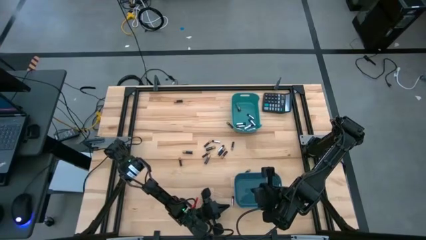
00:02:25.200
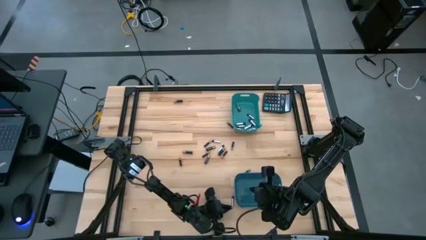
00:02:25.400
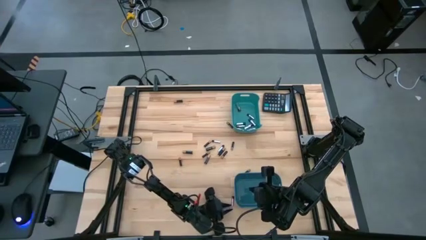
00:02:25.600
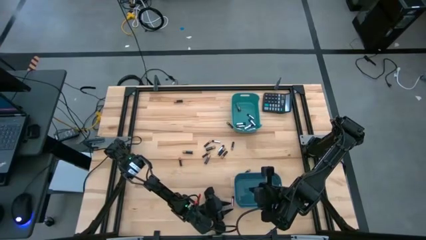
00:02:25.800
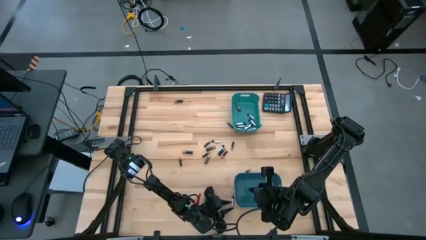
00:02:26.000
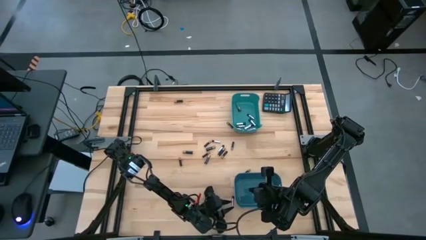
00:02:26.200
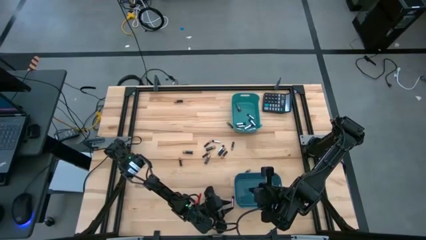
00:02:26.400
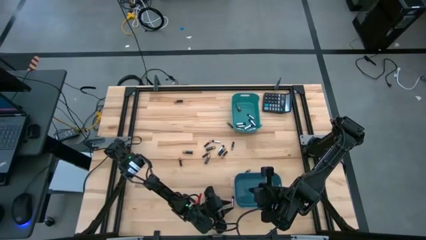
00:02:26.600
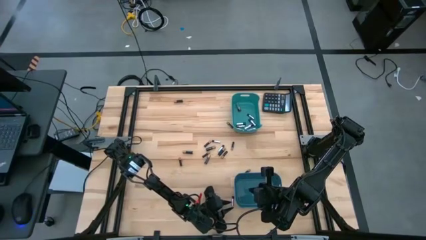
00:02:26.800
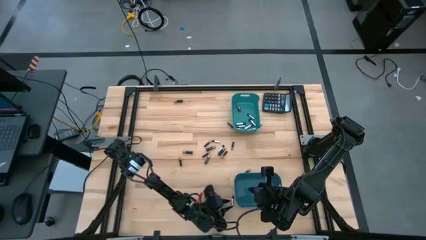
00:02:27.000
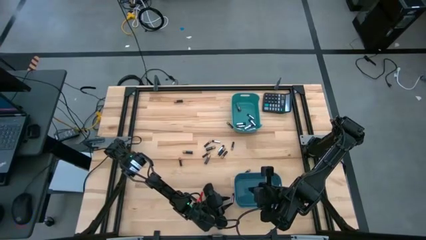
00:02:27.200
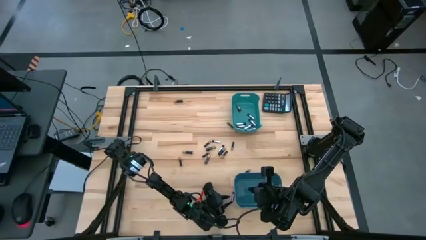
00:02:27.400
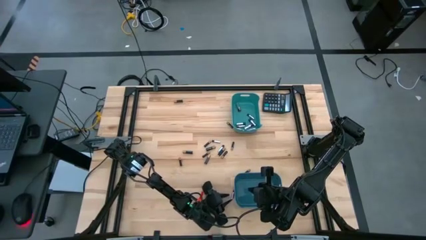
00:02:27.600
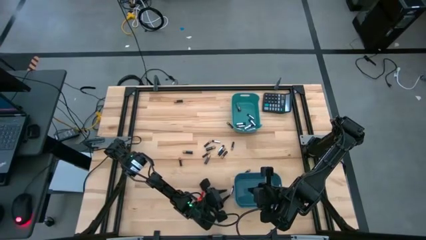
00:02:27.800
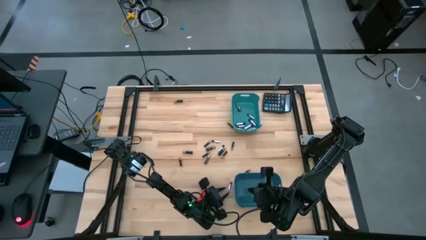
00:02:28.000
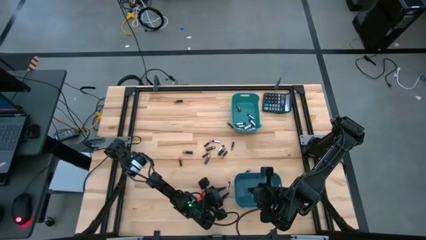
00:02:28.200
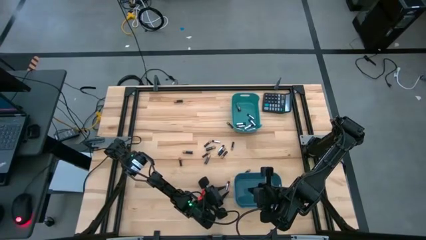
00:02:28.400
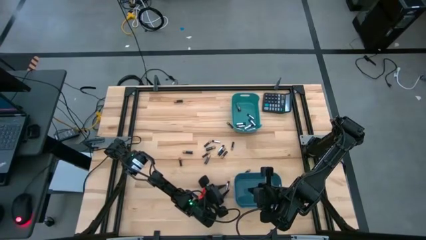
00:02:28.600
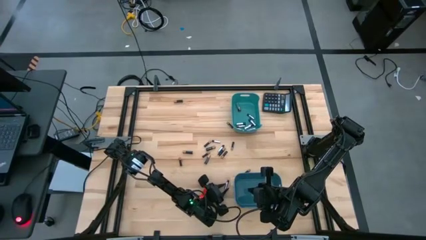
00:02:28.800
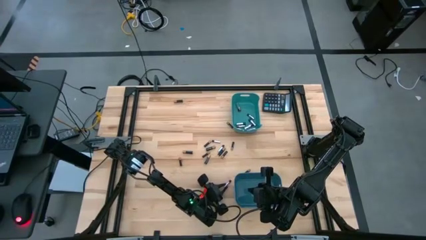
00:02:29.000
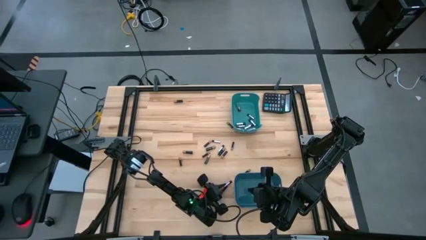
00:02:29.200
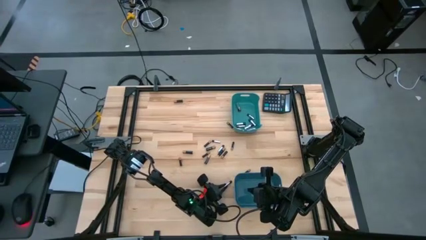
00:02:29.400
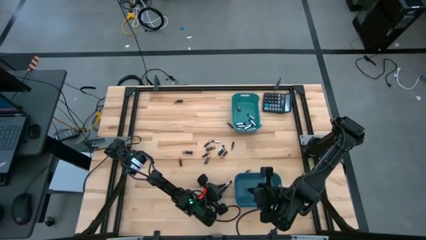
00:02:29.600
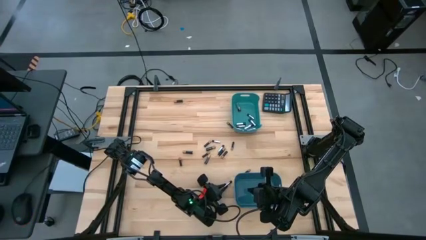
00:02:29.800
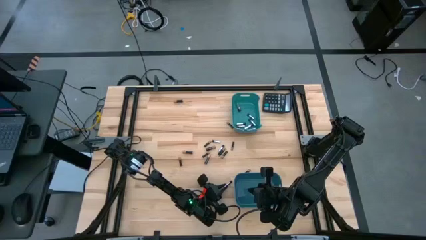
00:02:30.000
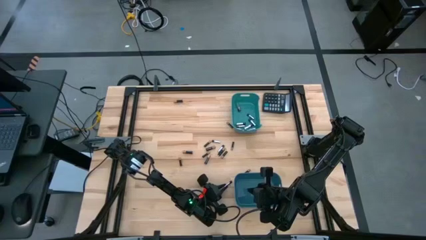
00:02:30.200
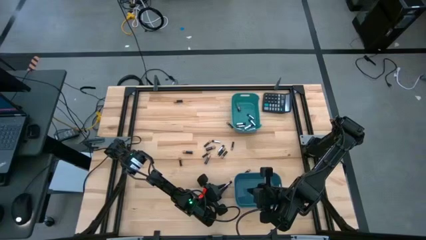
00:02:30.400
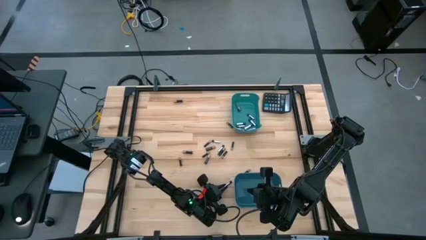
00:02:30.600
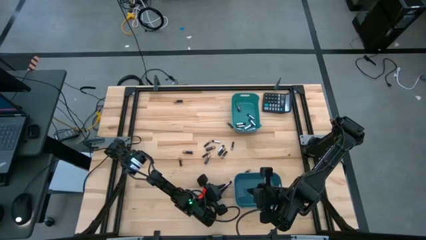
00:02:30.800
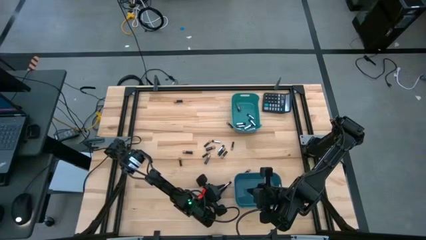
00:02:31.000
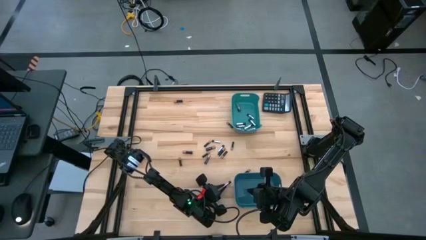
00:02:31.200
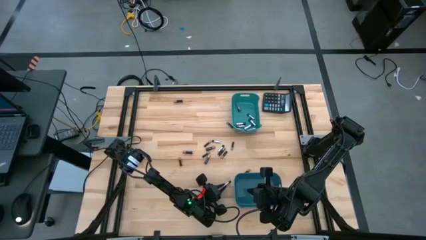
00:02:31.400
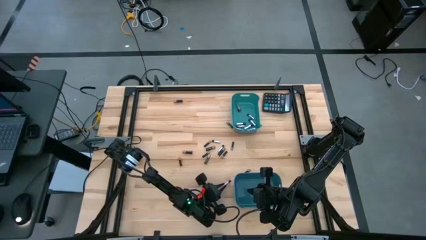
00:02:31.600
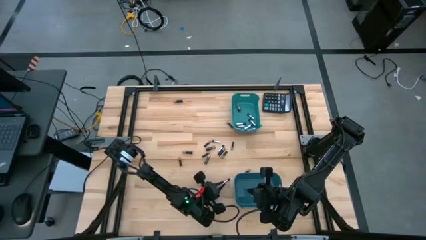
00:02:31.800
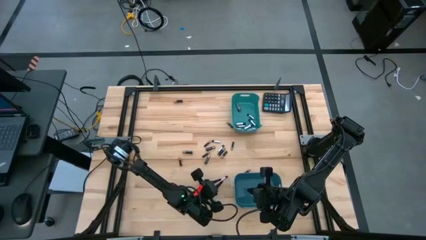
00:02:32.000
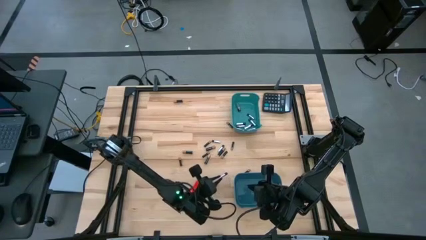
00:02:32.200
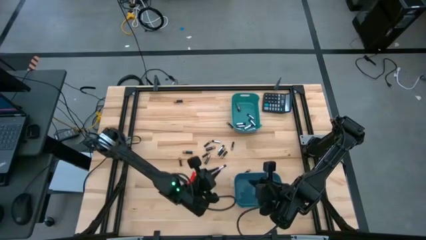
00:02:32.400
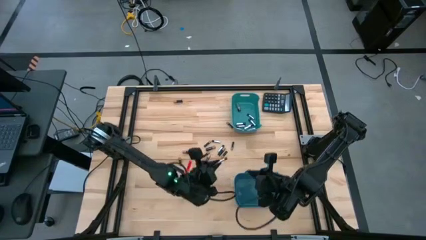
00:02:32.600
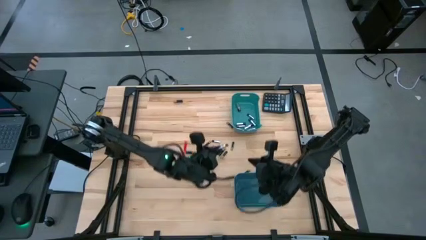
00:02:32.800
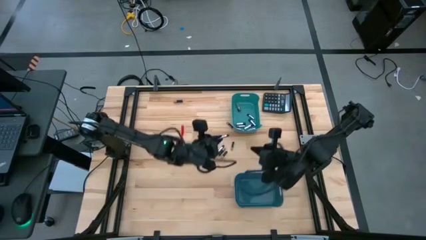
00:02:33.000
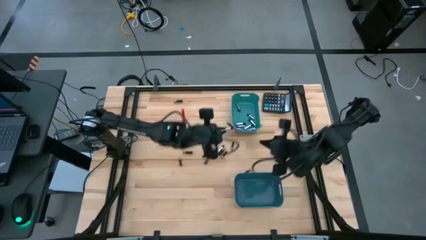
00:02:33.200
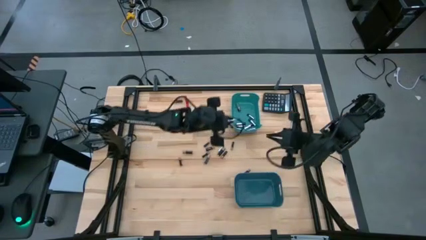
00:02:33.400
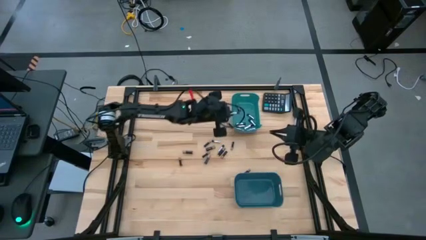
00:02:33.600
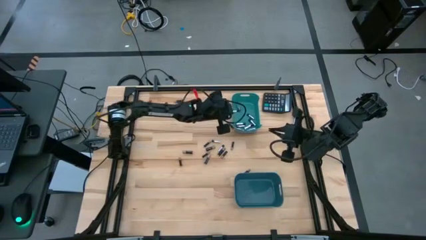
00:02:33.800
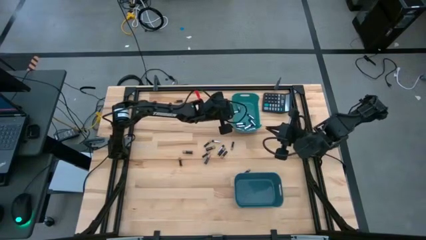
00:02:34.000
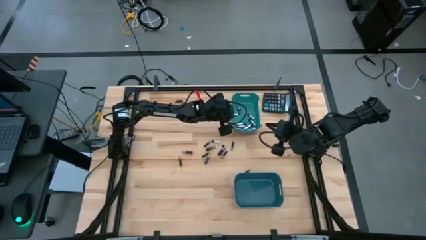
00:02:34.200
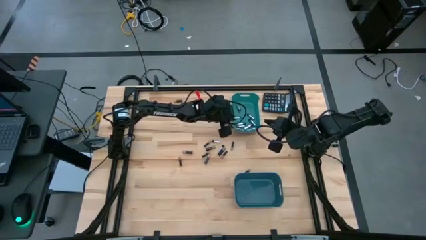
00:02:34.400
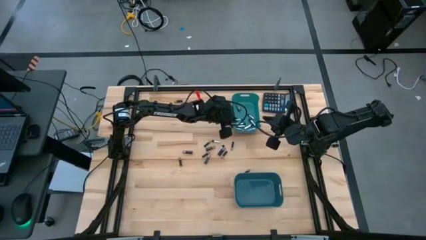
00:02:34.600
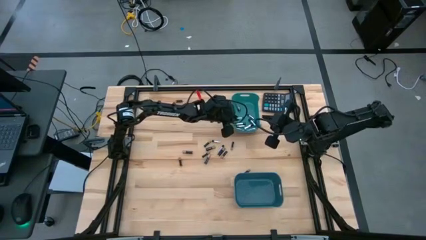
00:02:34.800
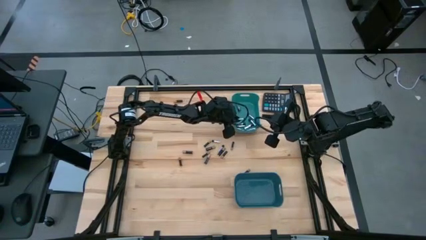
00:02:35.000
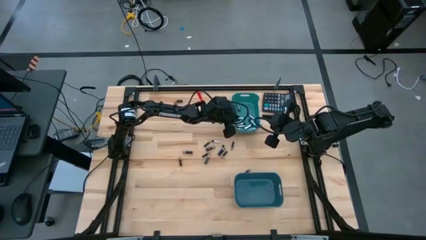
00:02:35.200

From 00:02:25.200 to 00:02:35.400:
Task: Sort batteries
Put the silver battery into the green bin

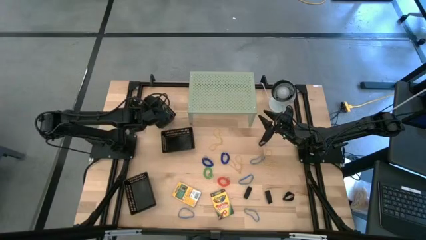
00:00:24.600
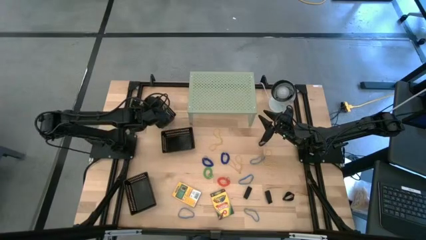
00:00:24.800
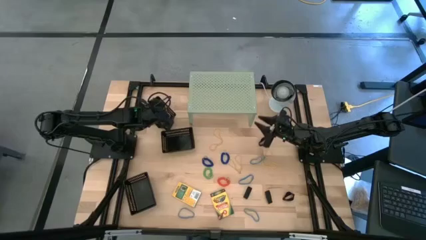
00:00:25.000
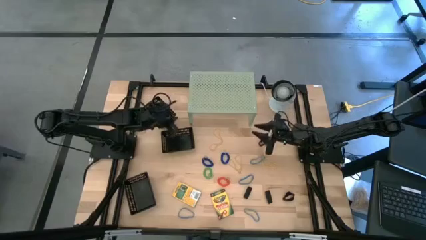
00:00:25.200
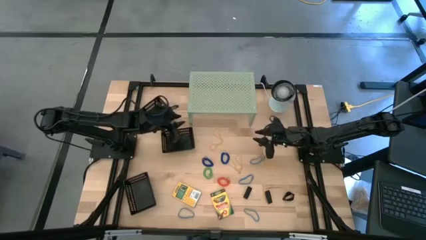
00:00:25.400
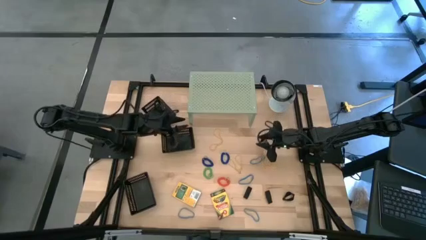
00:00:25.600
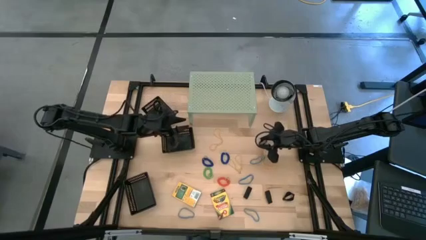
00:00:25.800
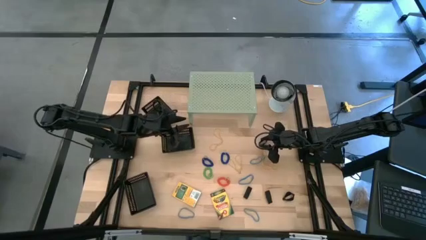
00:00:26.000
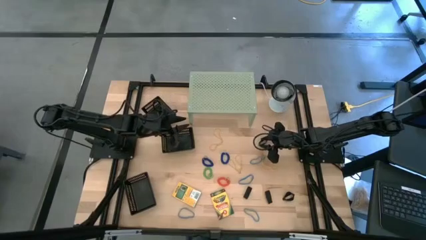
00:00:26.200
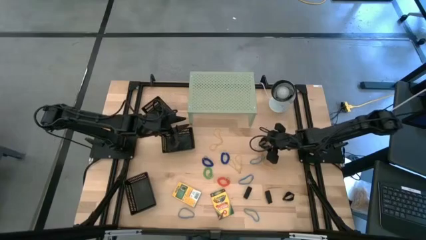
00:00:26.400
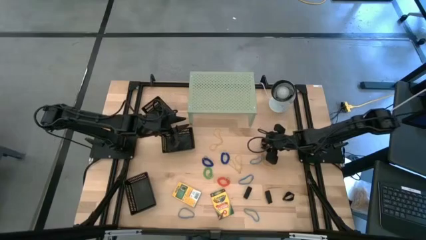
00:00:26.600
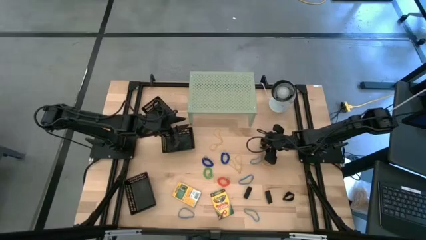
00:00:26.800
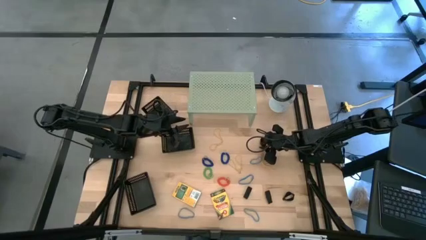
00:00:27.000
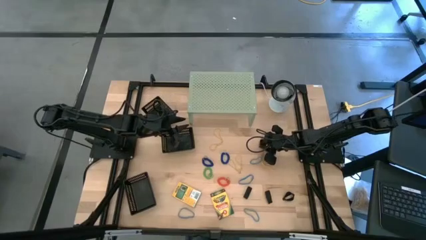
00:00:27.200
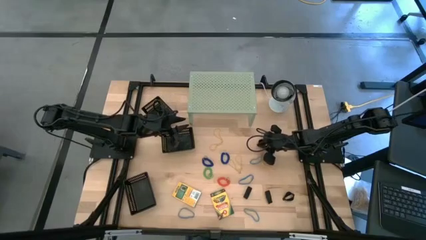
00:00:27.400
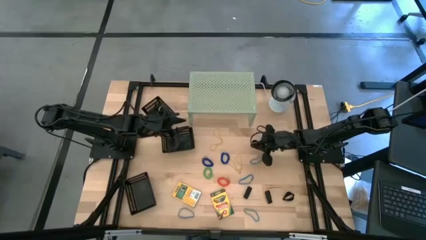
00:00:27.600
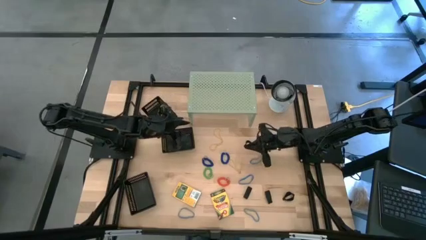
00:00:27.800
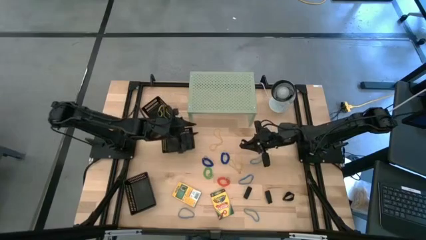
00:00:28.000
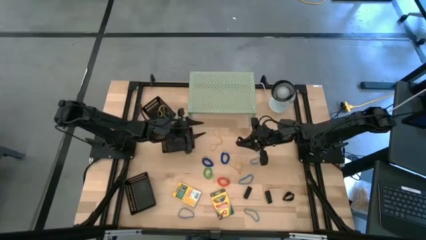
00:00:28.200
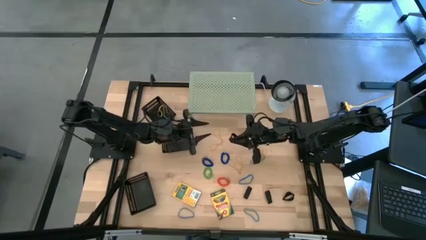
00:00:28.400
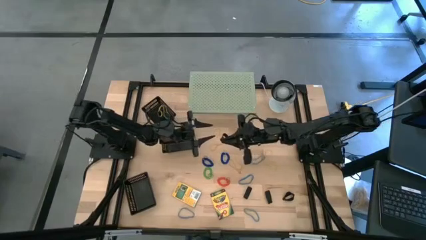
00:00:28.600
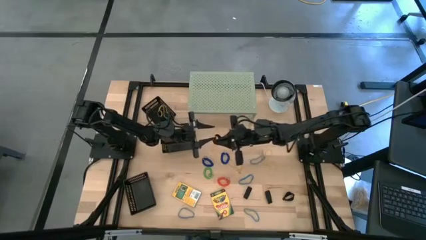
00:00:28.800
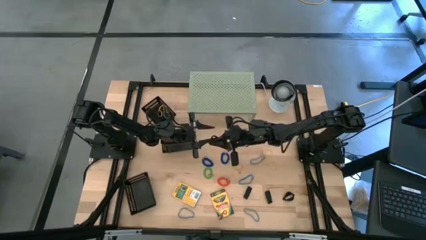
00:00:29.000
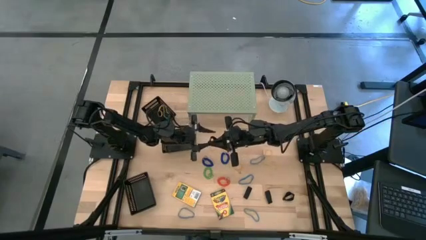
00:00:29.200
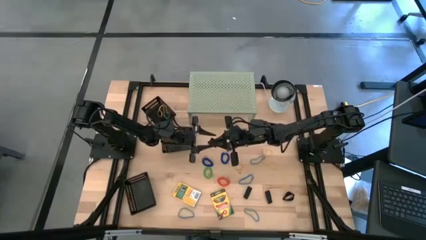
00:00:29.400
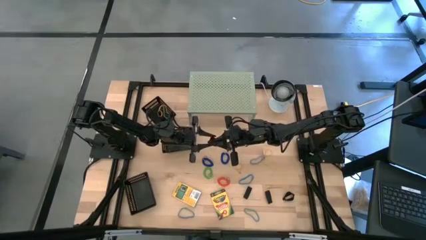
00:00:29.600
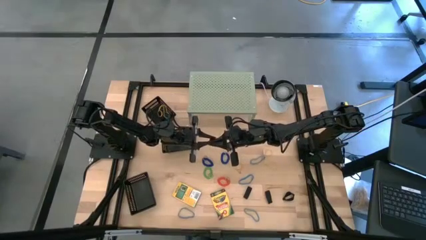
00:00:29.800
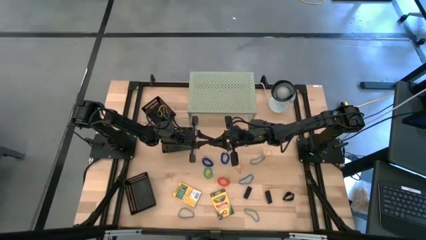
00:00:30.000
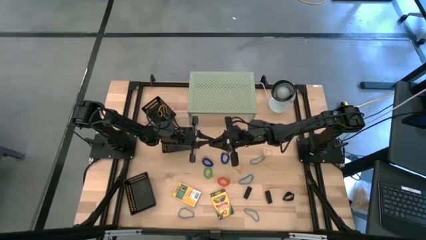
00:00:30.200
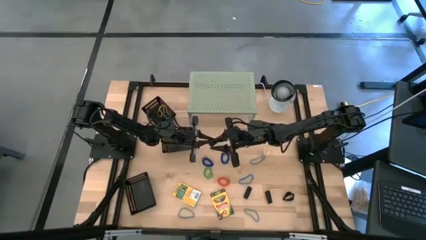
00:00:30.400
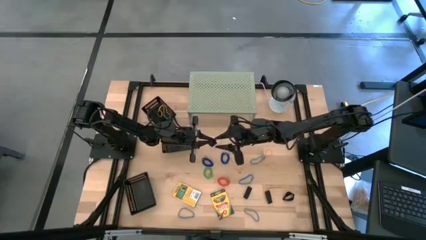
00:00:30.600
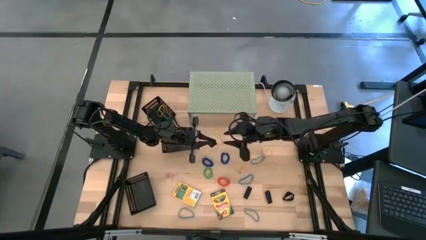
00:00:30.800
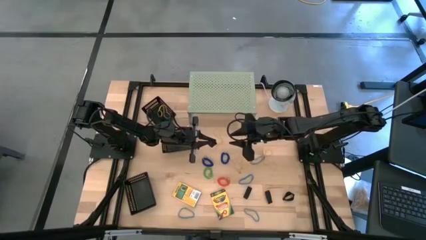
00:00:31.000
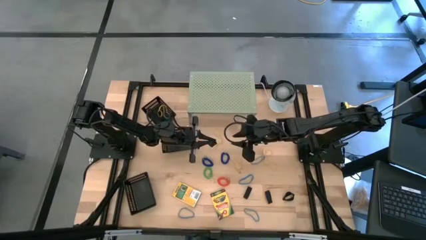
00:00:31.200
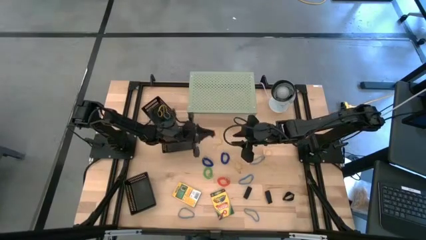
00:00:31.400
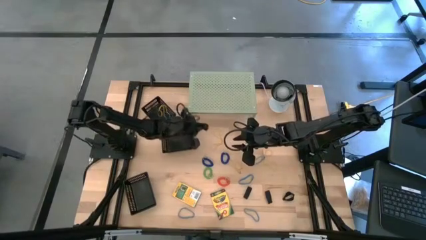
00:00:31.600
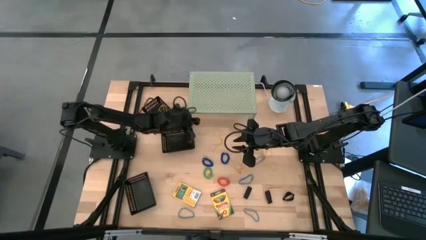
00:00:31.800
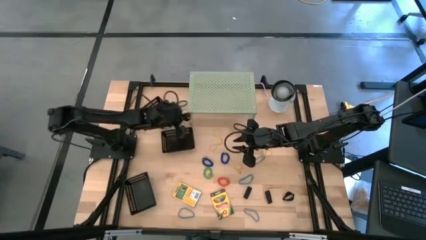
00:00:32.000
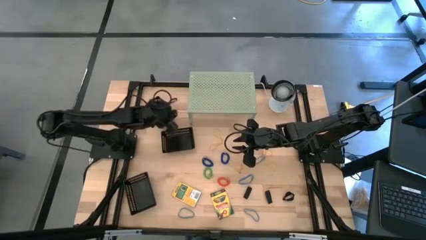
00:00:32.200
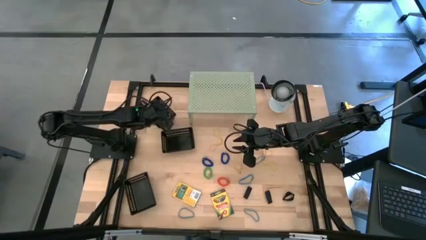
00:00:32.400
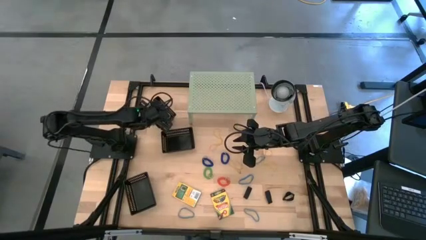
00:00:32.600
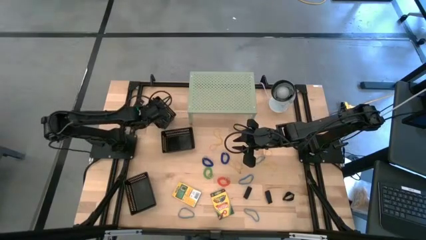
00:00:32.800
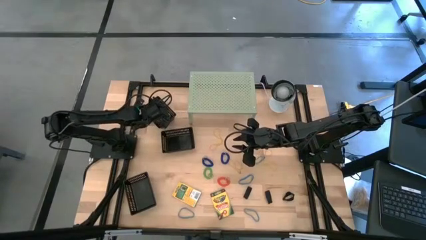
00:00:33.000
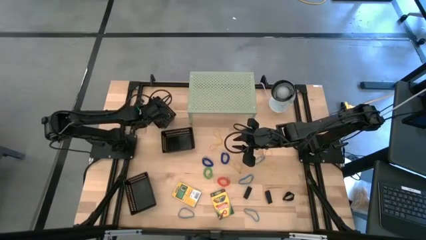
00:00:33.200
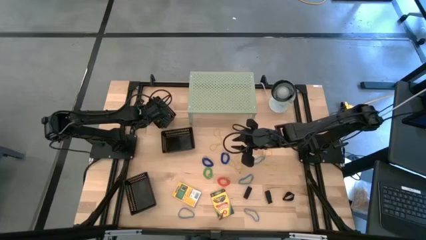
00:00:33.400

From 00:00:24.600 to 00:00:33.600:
Task: Pick & Place Office Desk Supplies
Put the black rubber band into the top black bin
